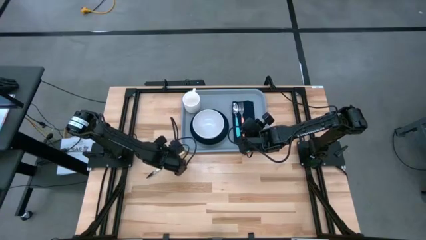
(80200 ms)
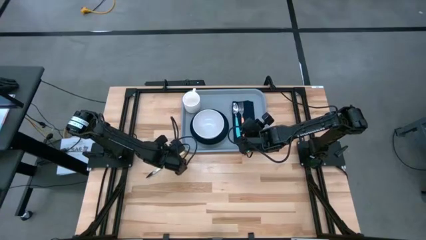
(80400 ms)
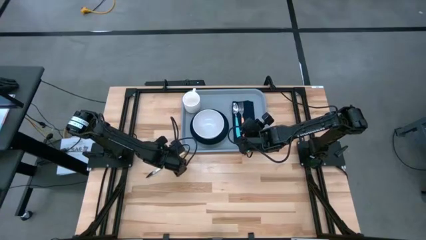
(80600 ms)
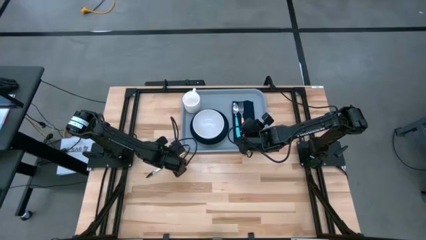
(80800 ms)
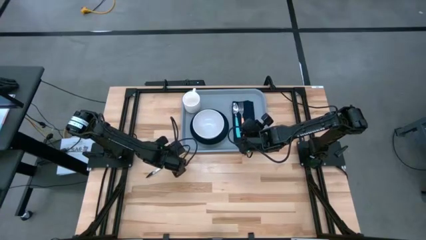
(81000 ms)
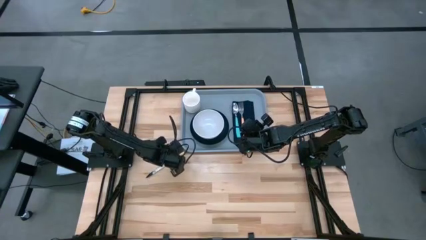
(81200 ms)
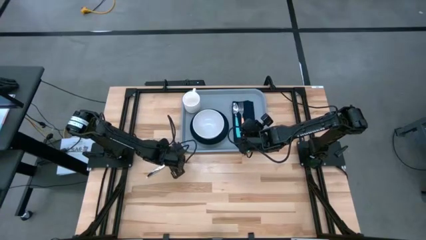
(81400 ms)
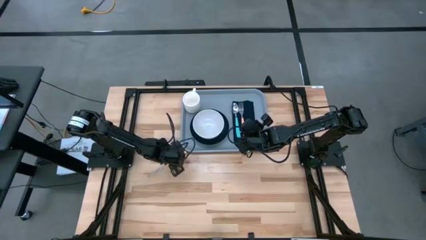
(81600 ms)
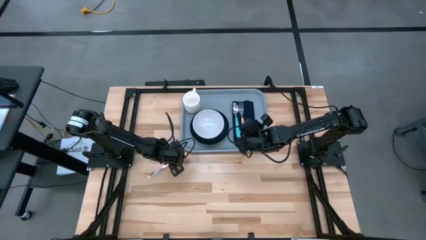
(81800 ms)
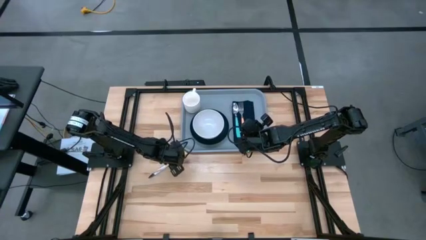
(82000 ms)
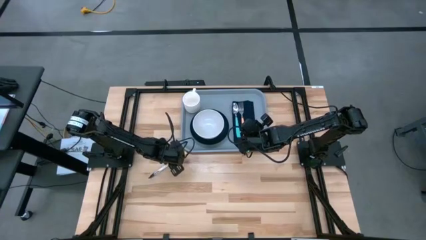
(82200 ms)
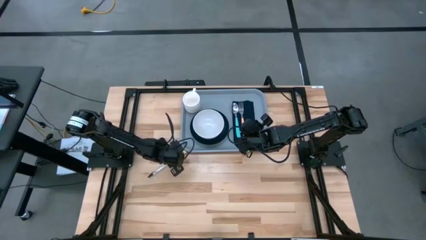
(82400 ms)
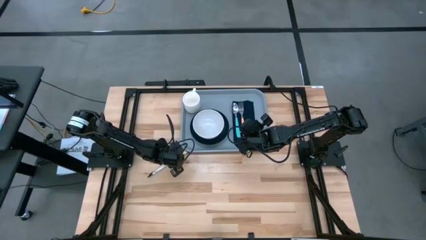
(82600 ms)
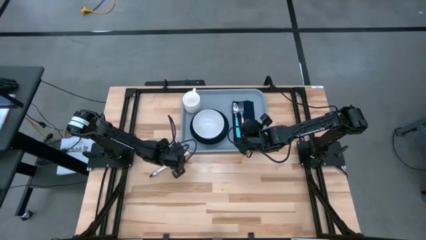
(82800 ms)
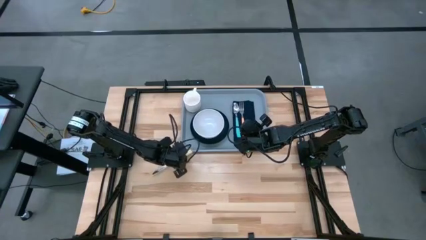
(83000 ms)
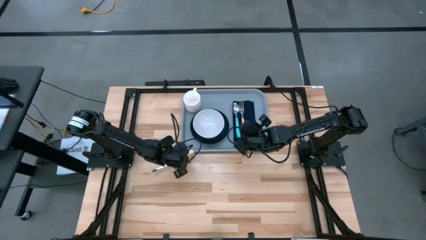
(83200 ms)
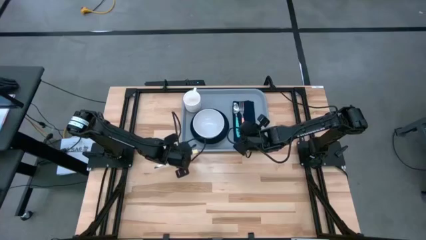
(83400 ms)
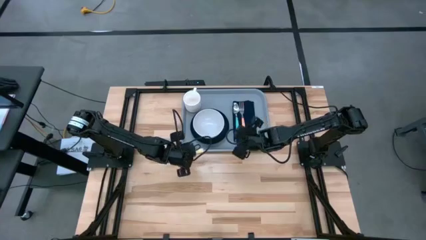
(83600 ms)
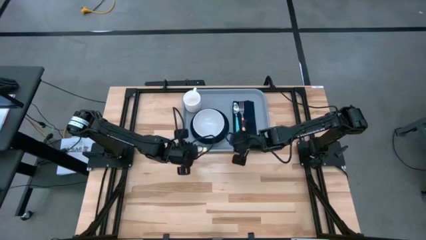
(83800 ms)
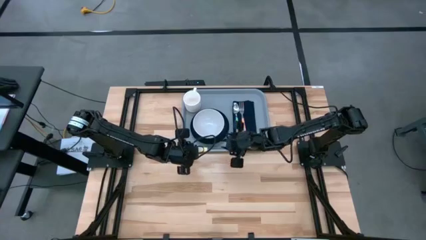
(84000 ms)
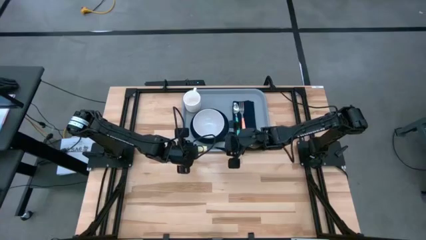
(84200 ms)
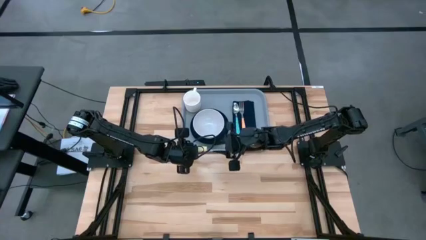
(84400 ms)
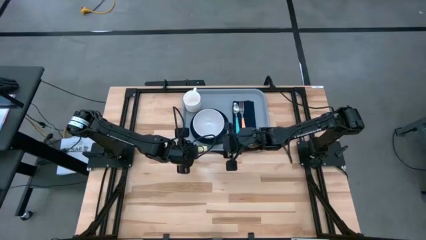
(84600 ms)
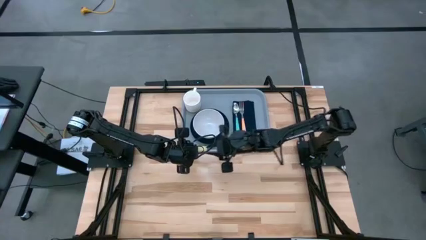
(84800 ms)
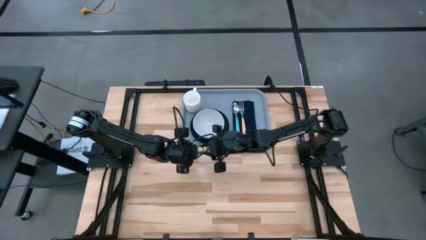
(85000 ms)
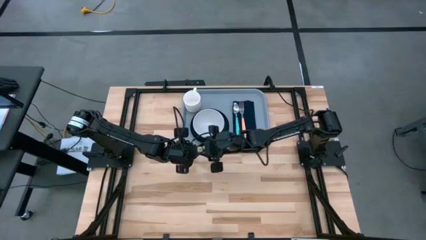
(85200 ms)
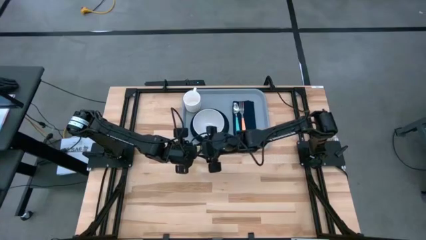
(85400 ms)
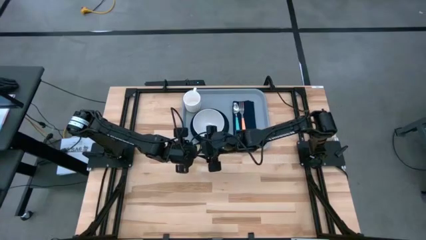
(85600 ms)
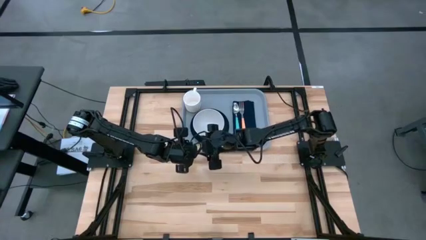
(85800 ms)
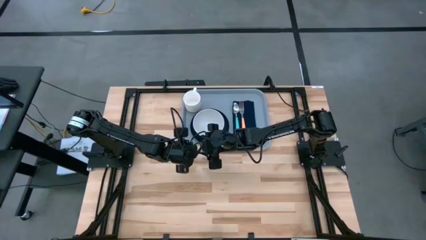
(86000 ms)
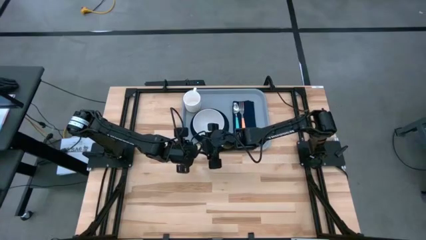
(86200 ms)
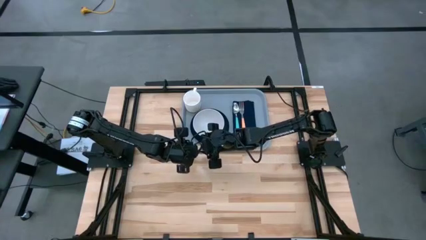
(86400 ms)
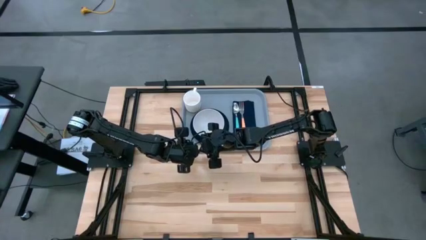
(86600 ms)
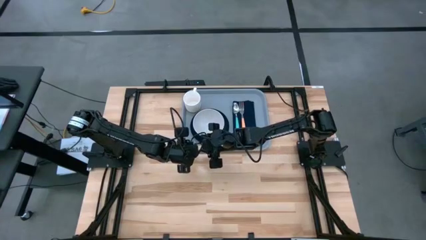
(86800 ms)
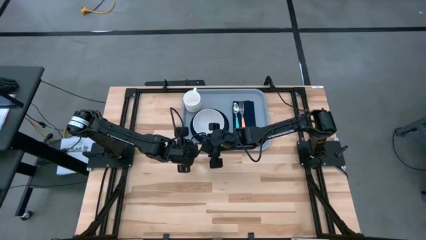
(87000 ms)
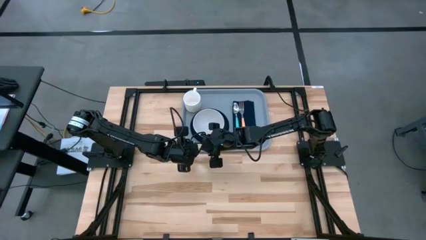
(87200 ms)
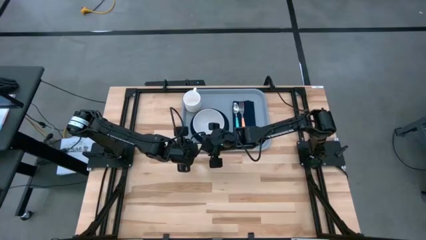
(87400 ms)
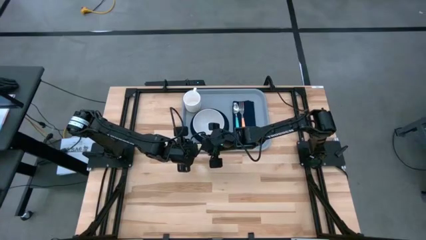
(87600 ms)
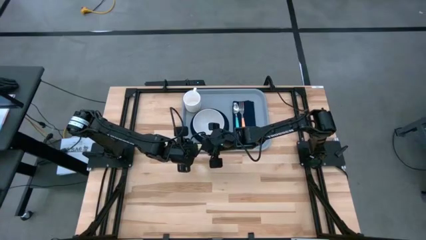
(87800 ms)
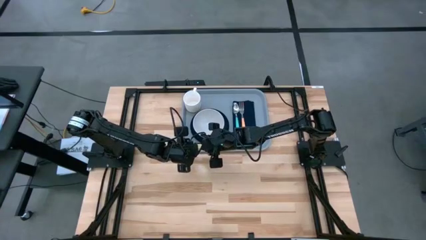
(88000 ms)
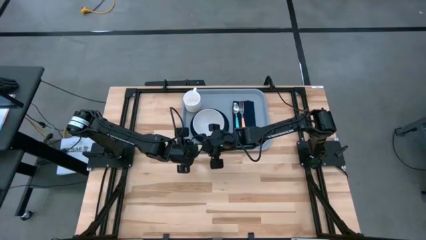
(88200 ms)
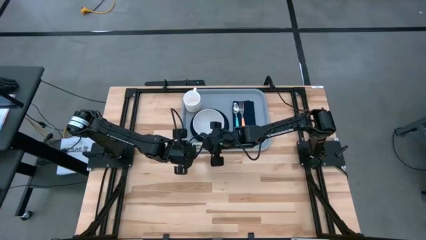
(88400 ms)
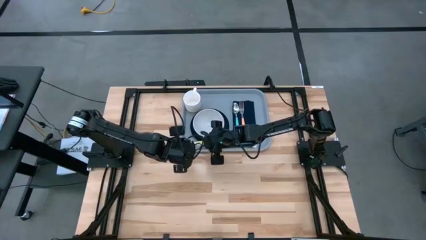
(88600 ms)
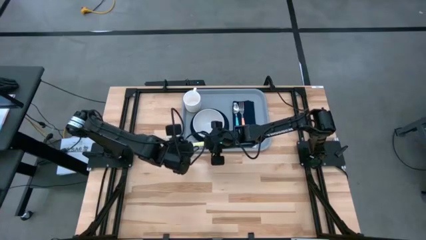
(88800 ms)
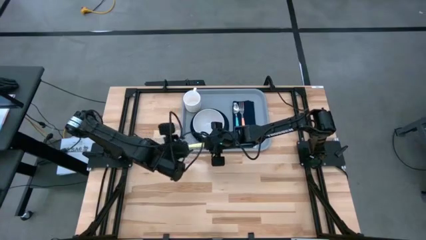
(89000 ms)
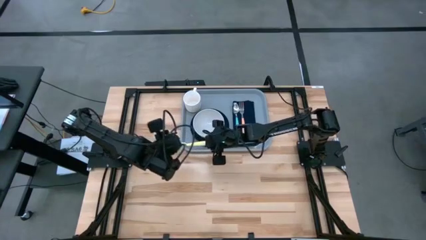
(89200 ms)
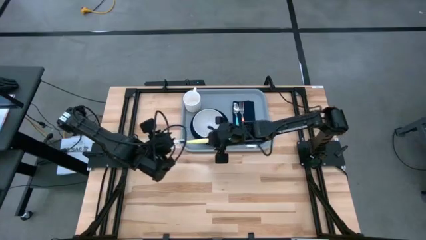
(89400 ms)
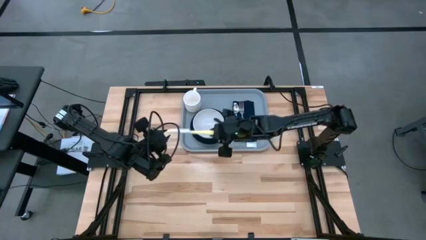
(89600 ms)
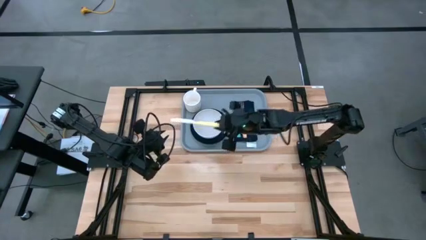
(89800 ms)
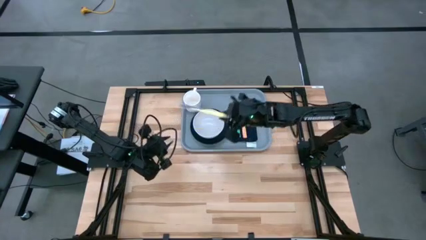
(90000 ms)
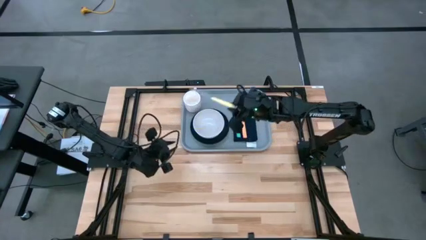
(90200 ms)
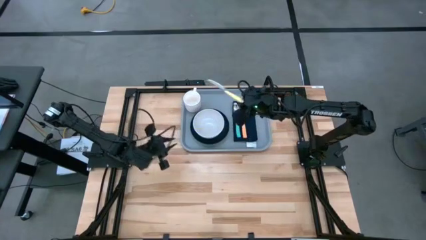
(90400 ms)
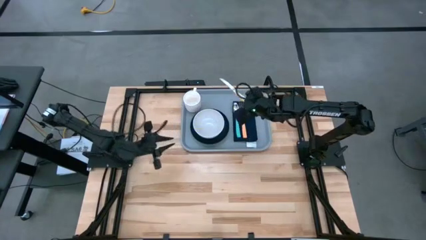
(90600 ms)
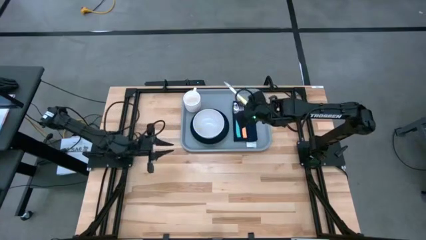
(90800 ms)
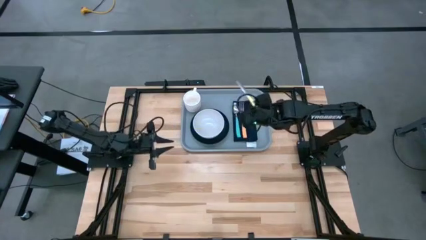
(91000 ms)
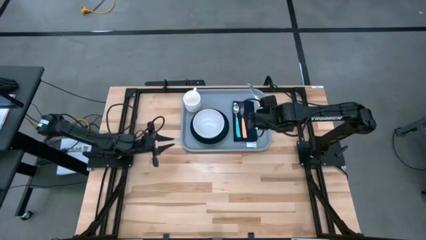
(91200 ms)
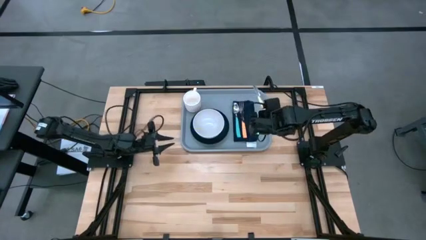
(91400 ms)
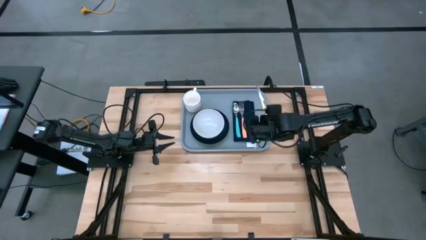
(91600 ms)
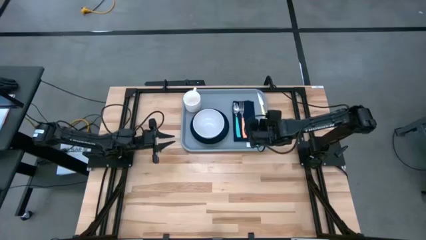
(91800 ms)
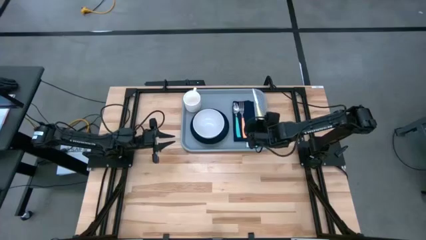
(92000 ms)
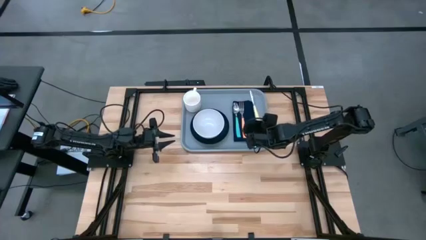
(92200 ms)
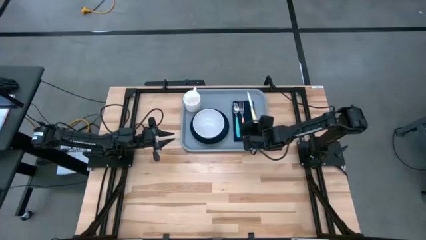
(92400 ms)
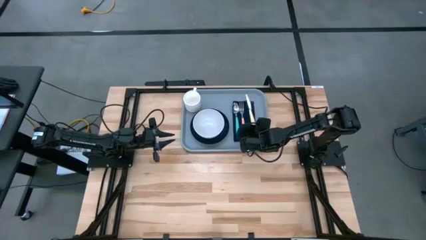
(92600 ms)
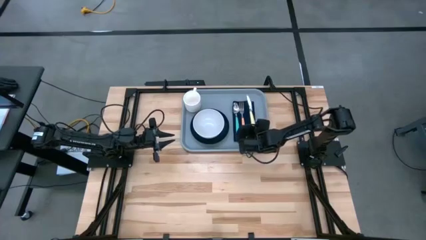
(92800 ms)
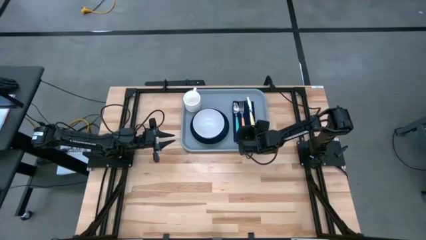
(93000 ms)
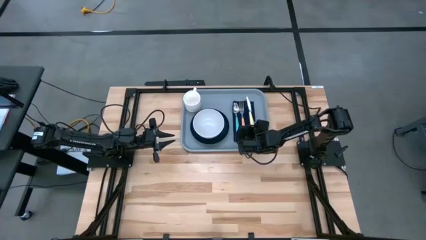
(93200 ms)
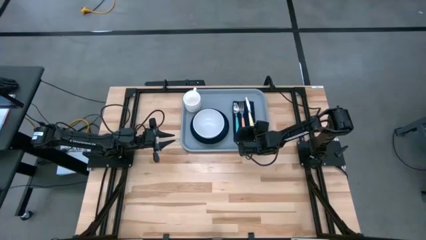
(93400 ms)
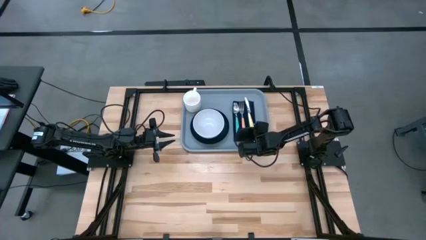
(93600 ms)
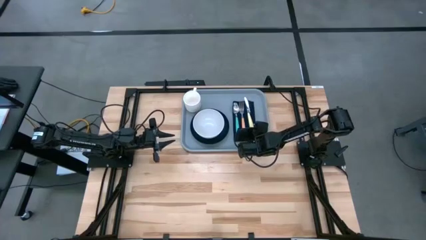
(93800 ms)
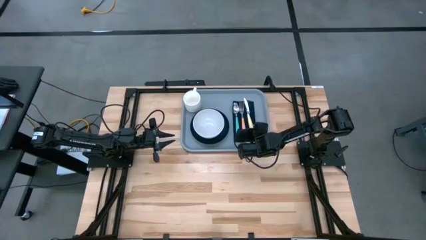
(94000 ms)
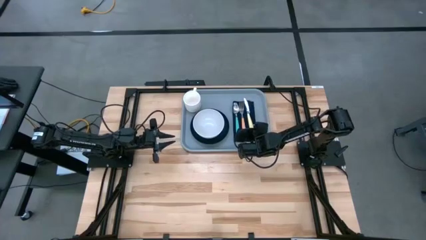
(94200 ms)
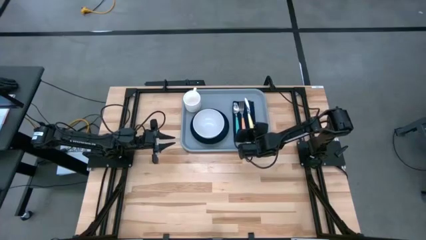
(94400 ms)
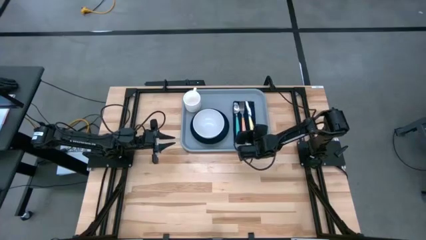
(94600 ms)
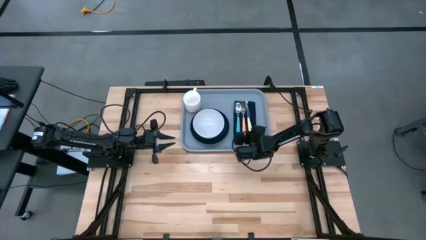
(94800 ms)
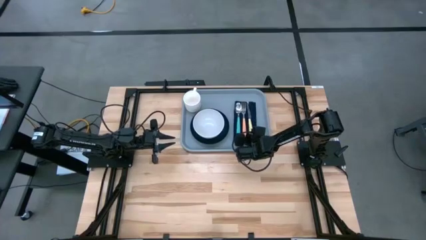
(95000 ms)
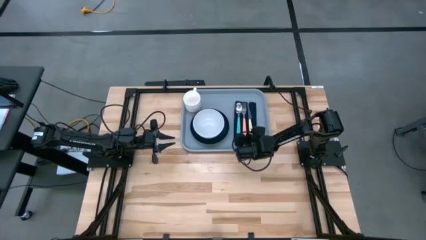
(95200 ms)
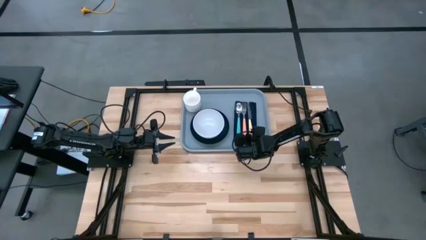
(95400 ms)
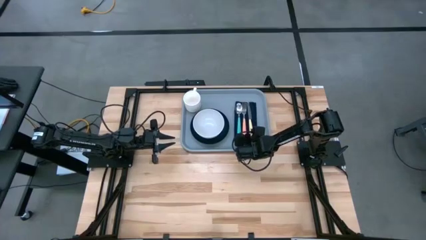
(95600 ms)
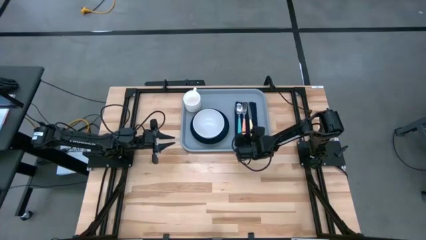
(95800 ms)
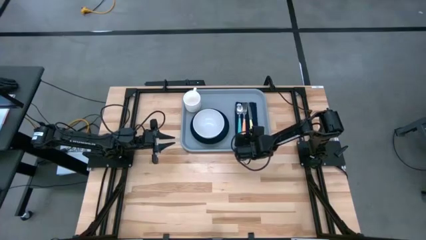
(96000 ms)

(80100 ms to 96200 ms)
Task: Set up tray
Put the yellow table knife to the right of the orange fork on the gray table tray
